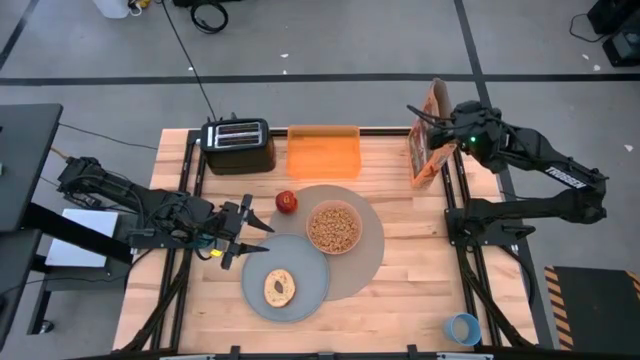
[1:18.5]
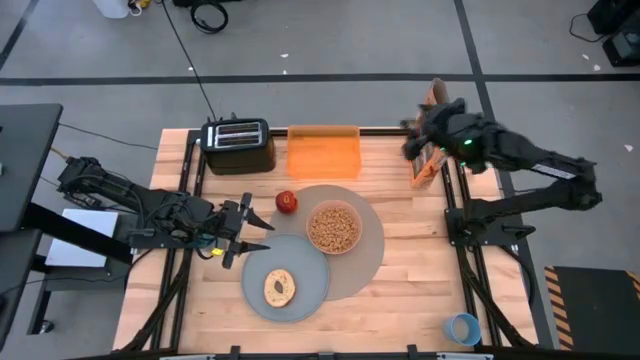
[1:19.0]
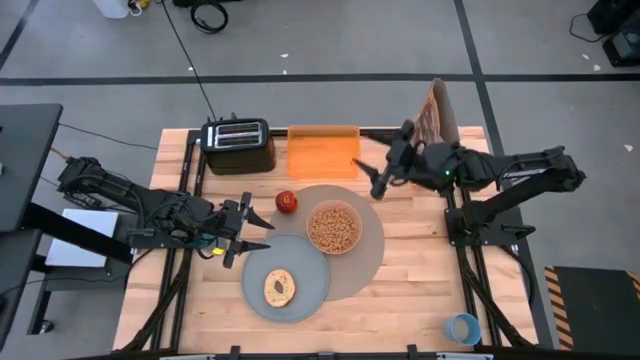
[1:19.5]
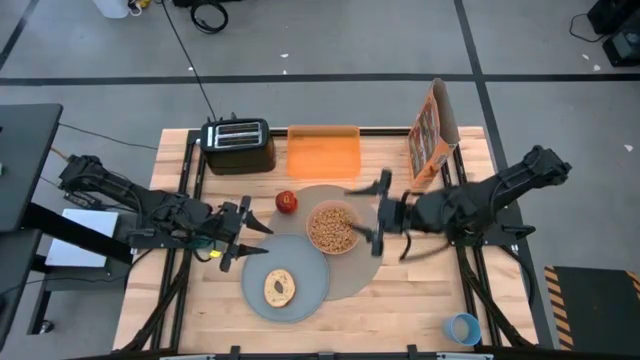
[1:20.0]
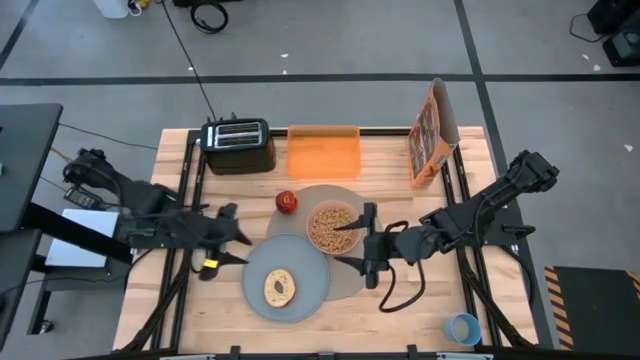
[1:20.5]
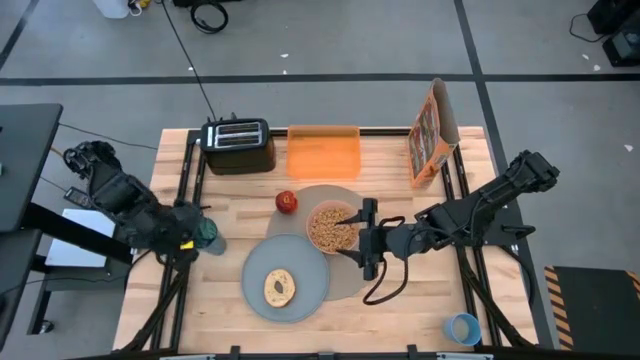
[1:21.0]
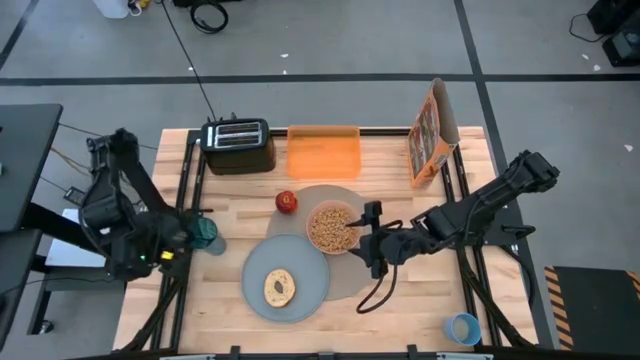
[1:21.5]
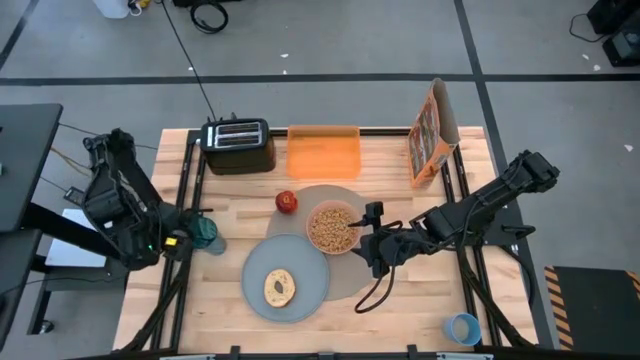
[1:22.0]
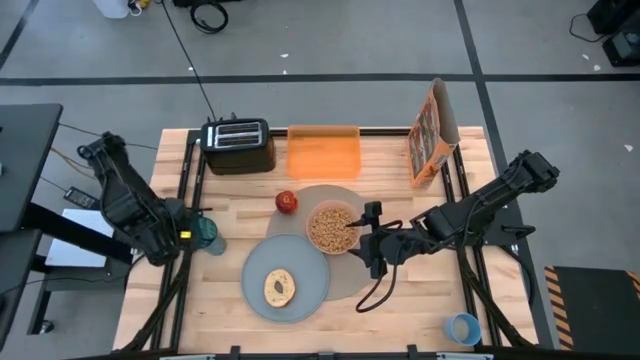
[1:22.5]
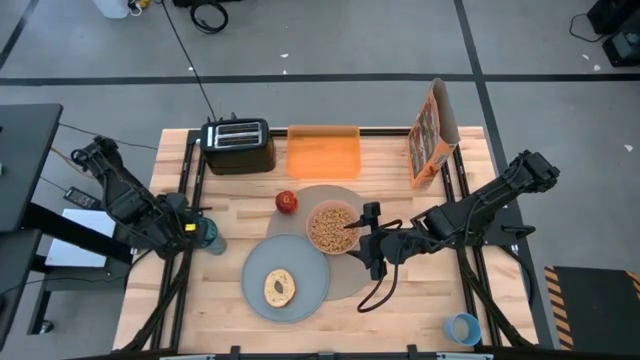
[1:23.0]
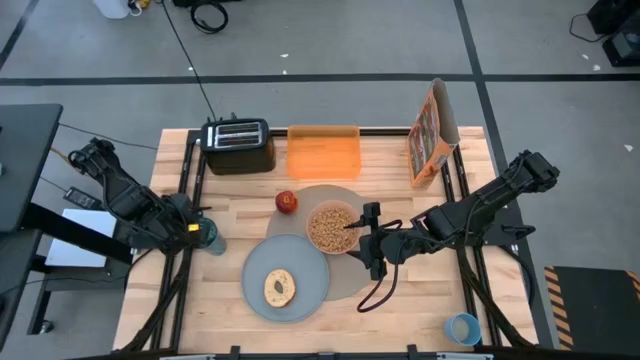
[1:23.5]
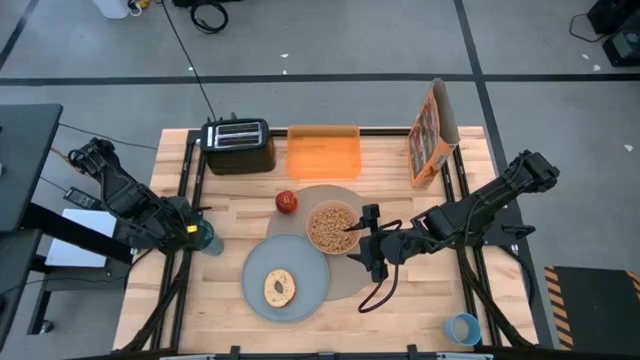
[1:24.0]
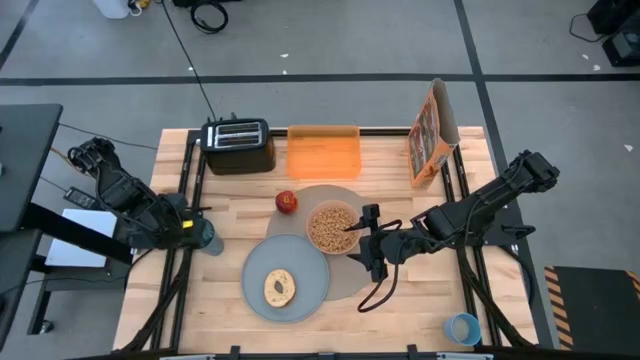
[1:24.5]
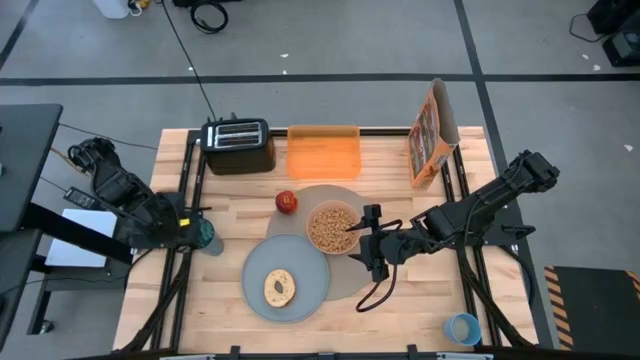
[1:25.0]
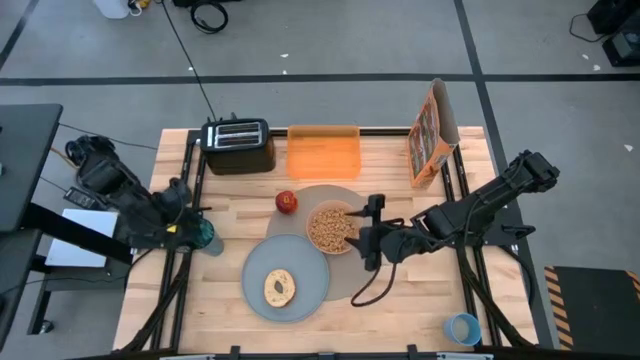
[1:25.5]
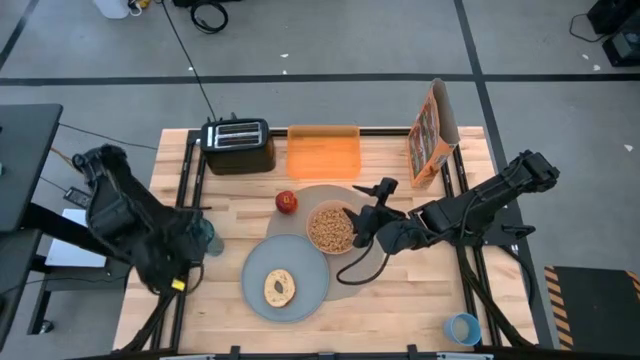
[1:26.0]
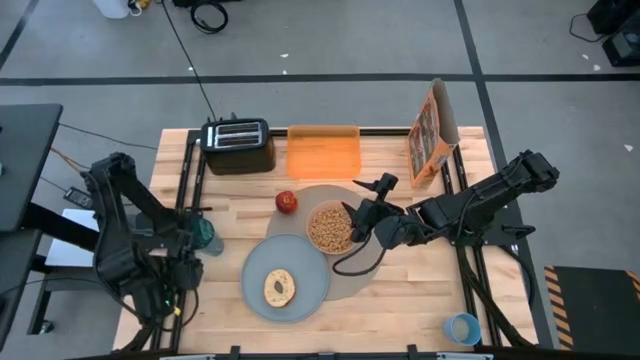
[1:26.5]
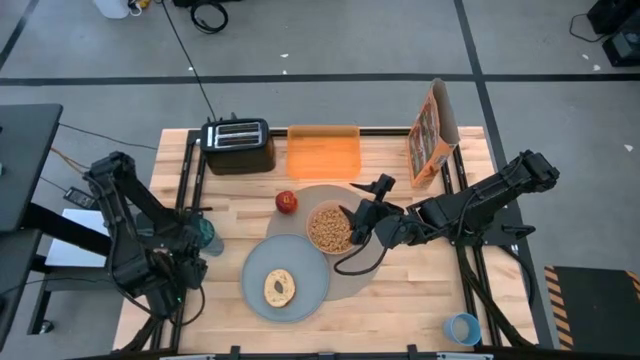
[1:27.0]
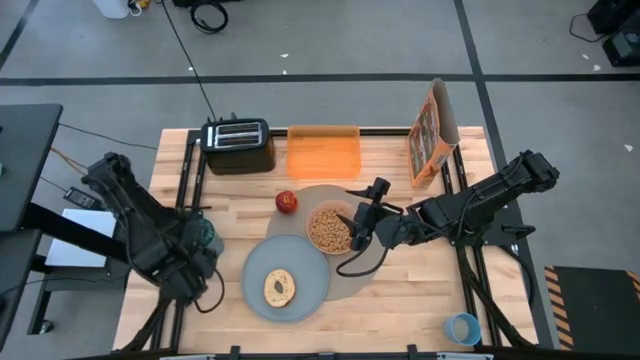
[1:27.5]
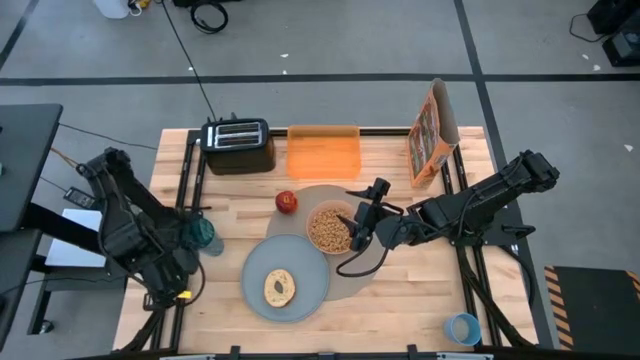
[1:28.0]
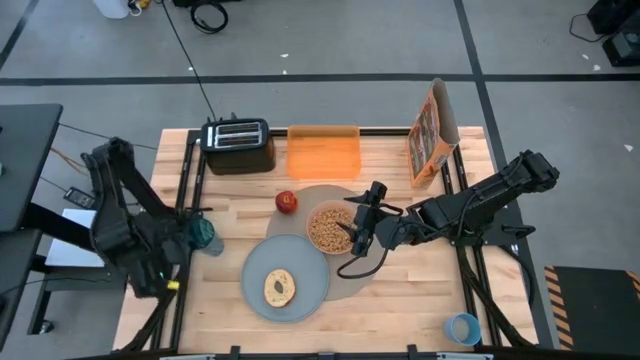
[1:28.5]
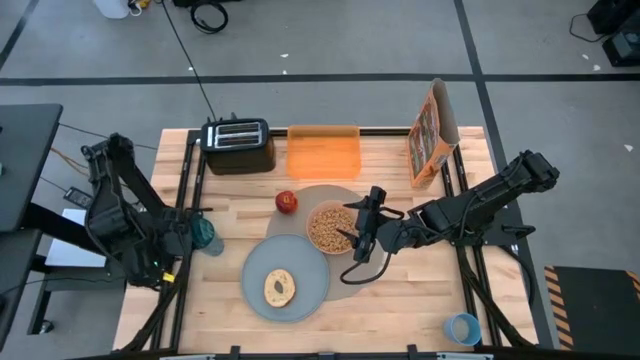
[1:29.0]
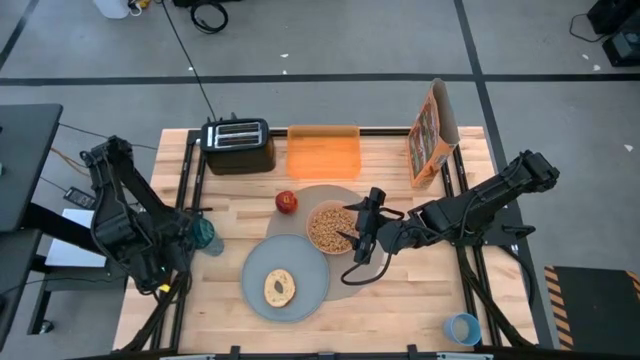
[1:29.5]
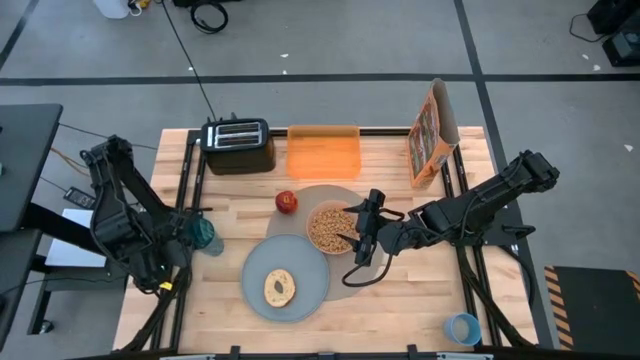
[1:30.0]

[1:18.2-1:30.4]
Task: Arrange a breakfast setting
Put the black spoon on the brown tablemat

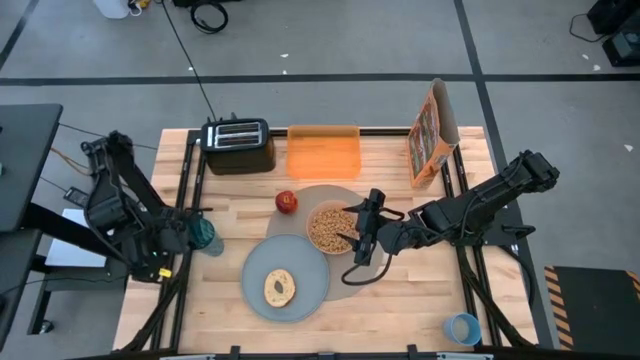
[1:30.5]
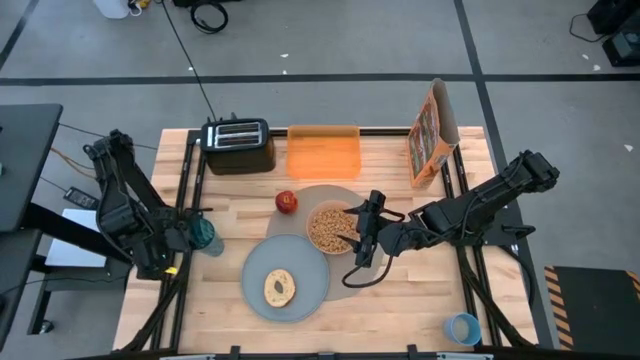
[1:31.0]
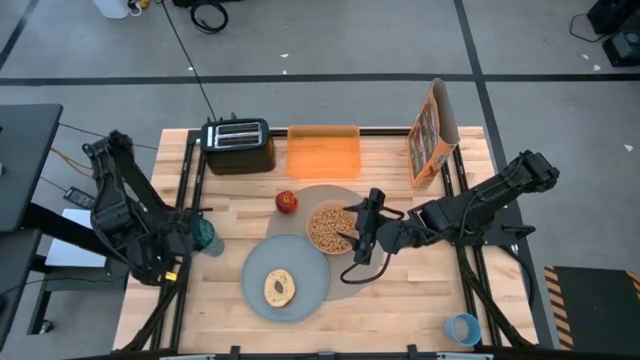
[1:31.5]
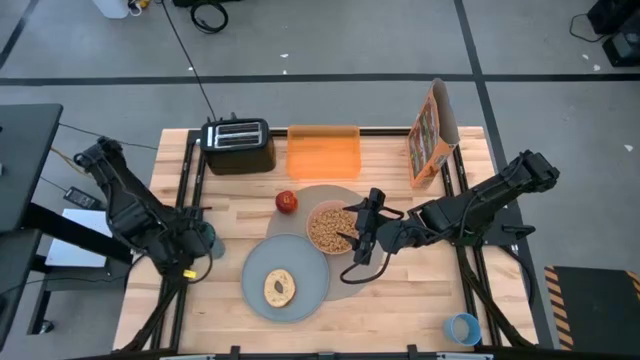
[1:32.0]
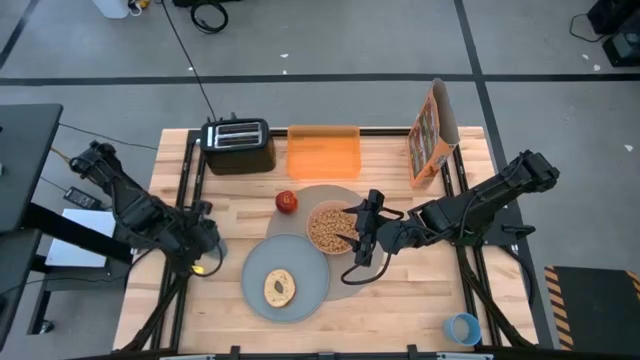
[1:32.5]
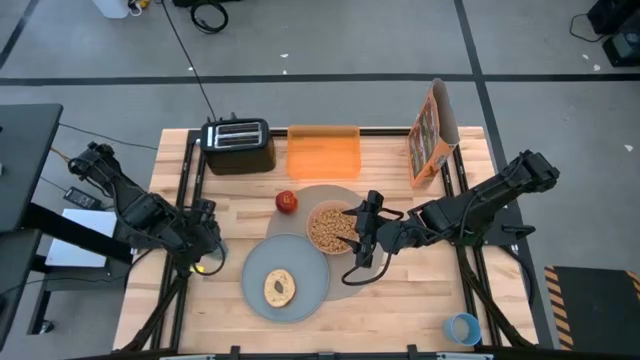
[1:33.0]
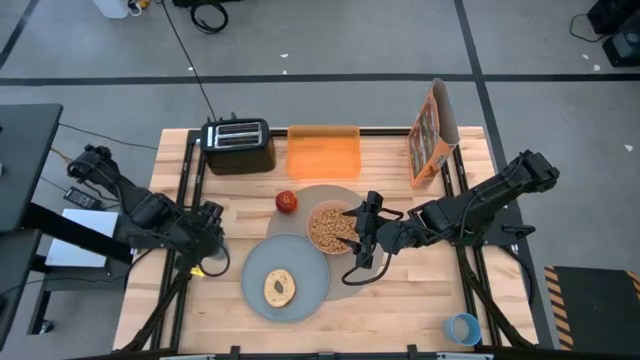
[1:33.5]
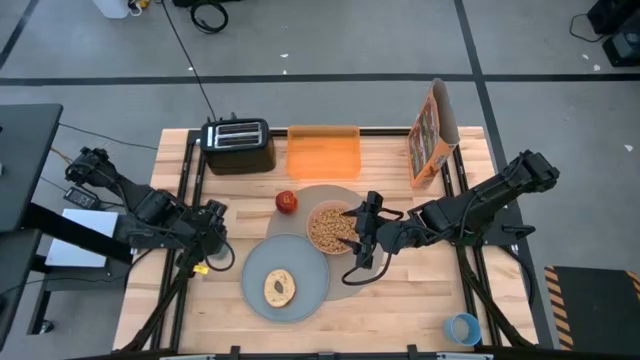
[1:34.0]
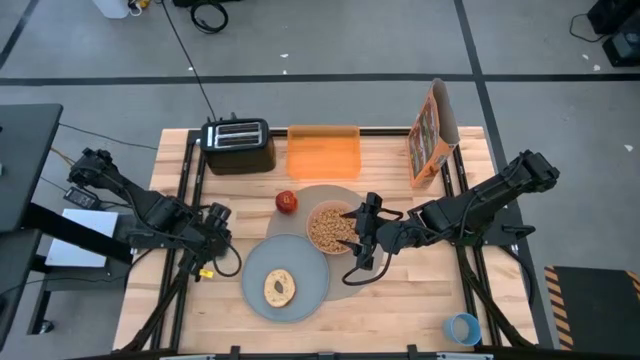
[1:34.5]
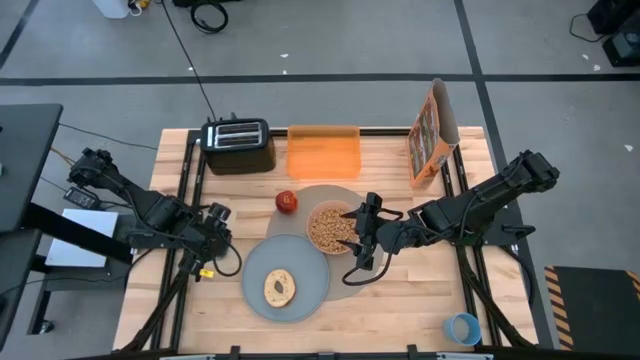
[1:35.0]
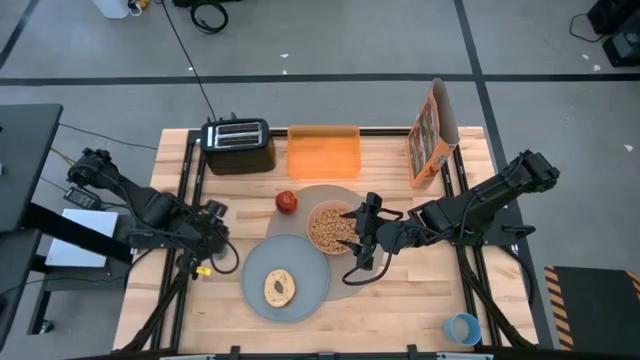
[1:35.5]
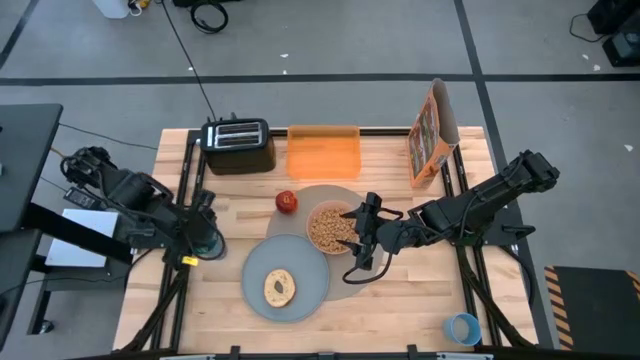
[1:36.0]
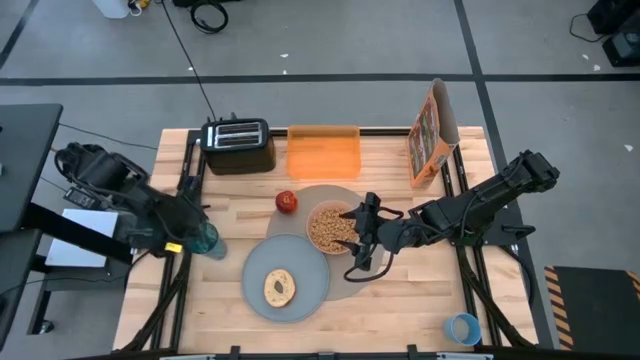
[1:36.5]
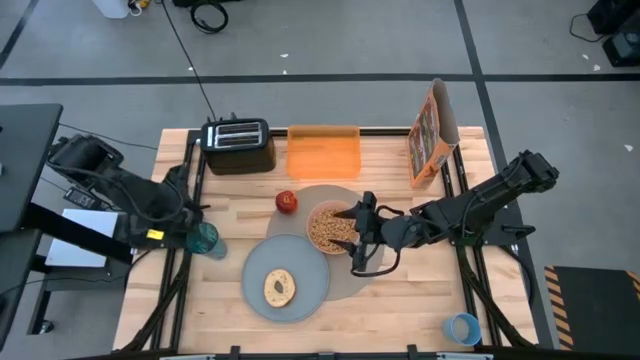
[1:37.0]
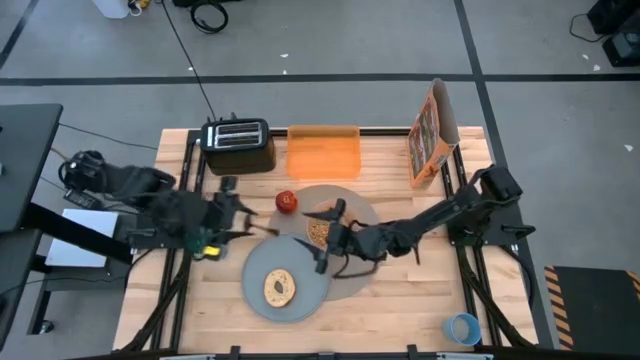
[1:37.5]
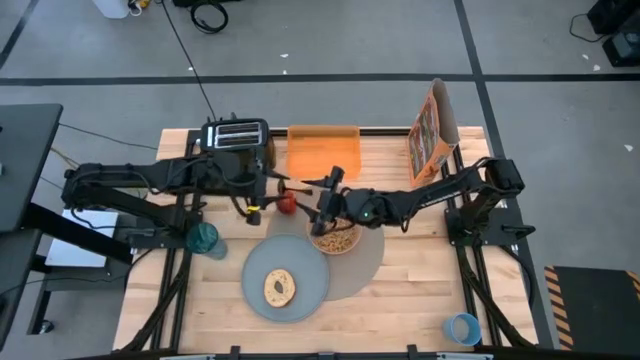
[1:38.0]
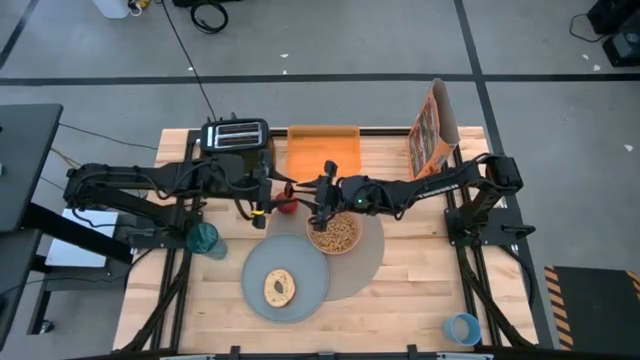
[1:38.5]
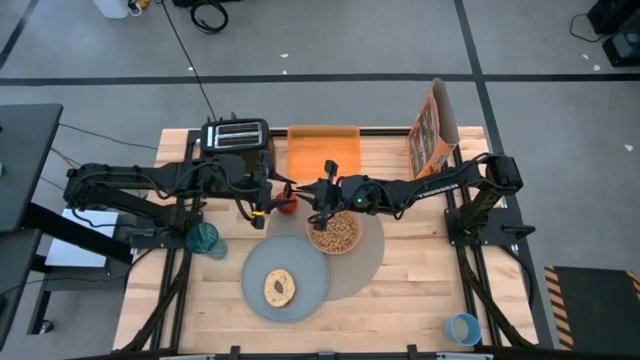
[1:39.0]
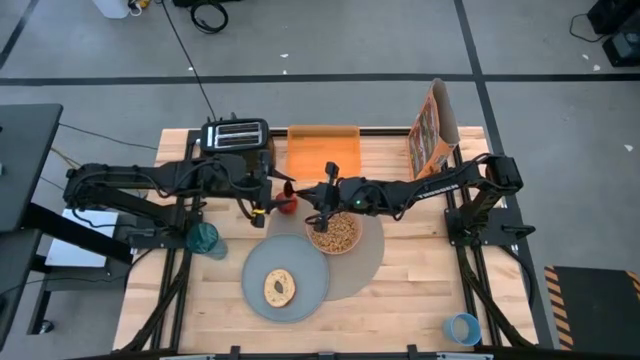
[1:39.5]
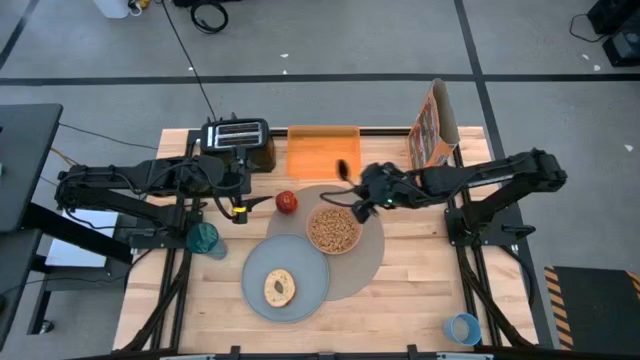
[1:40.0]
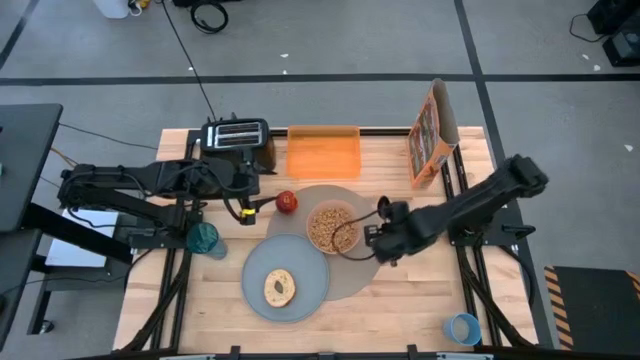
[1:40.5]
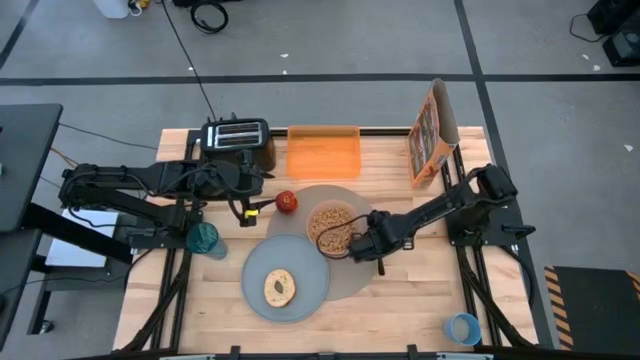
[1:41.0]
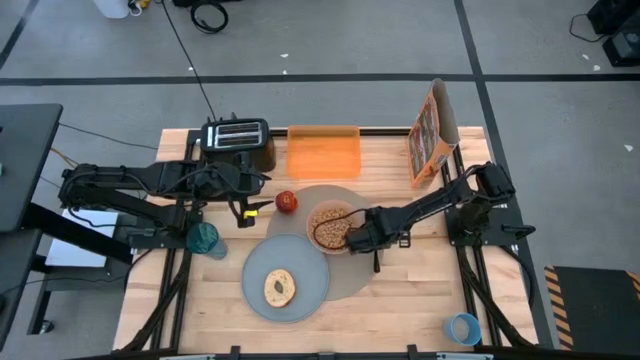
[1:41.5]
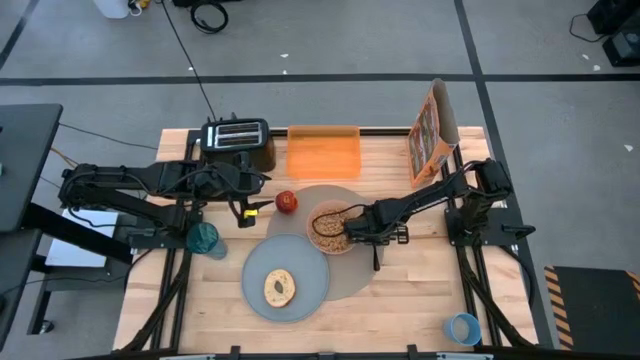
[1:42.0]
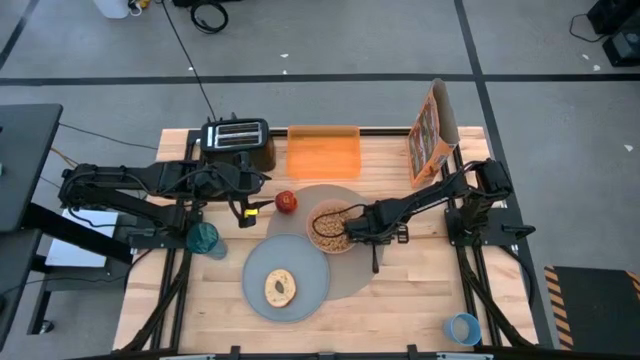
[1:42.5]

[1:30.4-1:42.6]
Put the black spoon on the brown tablemat
